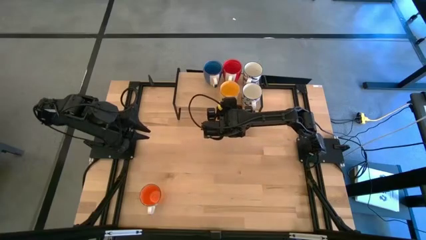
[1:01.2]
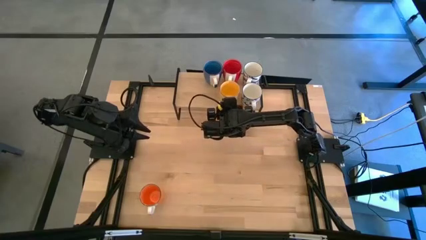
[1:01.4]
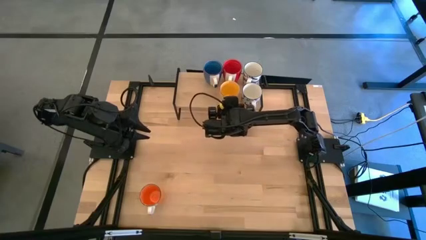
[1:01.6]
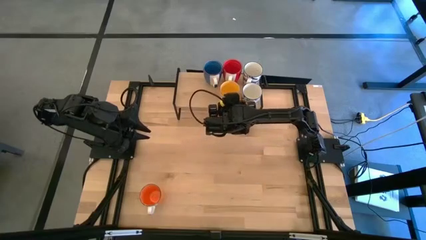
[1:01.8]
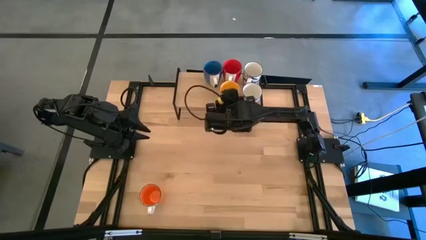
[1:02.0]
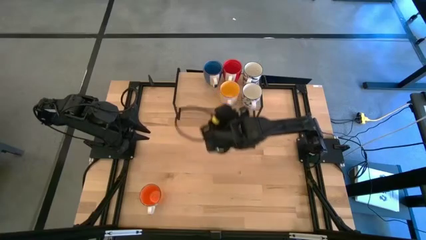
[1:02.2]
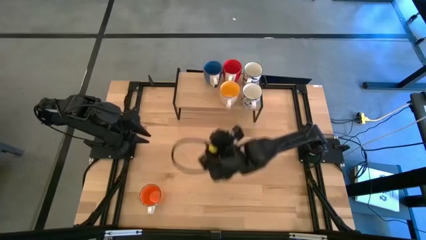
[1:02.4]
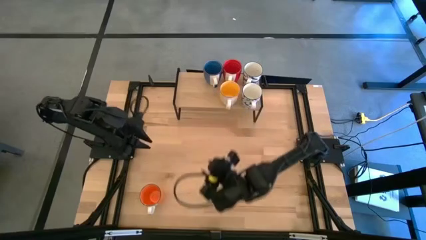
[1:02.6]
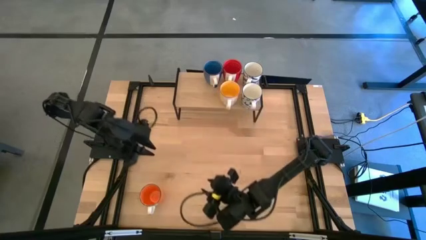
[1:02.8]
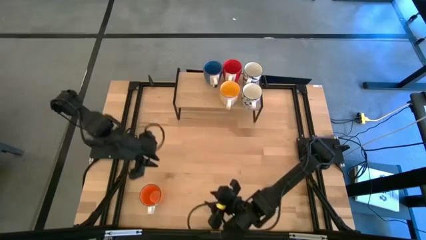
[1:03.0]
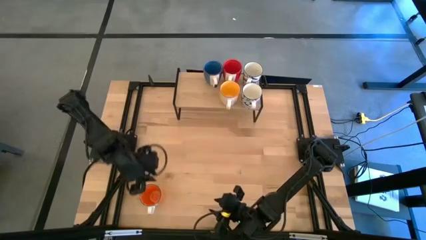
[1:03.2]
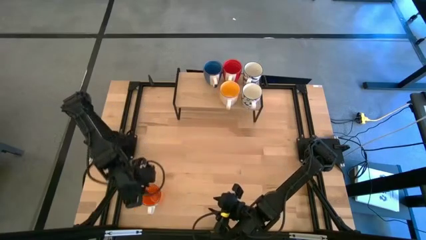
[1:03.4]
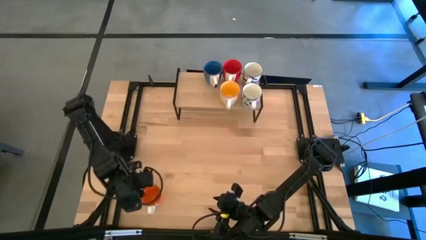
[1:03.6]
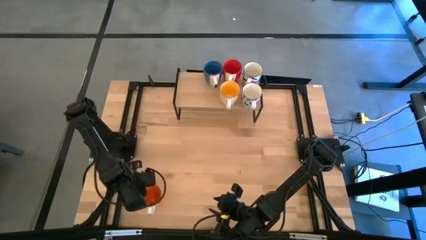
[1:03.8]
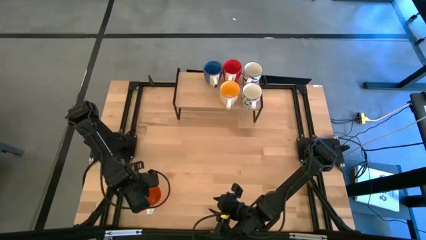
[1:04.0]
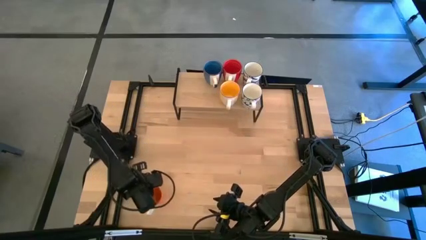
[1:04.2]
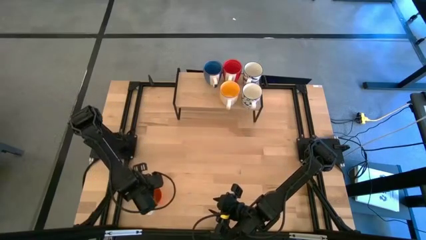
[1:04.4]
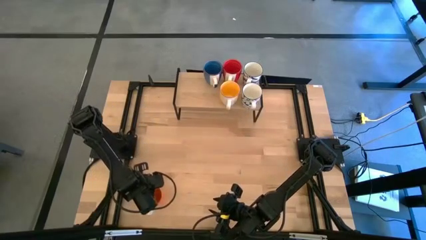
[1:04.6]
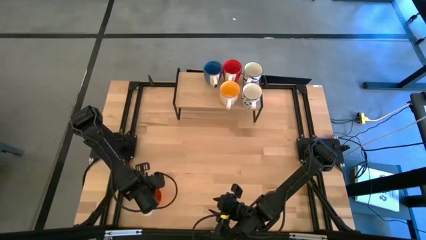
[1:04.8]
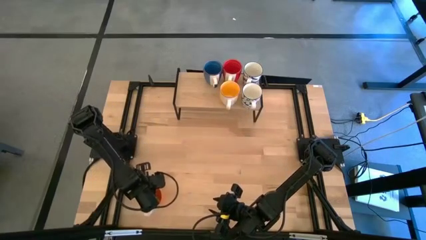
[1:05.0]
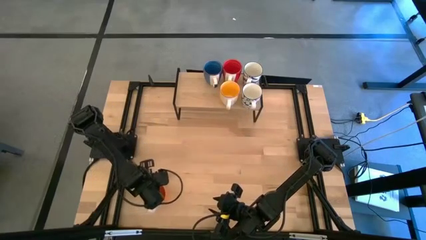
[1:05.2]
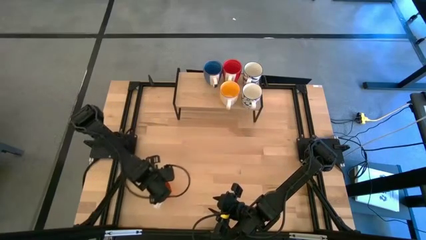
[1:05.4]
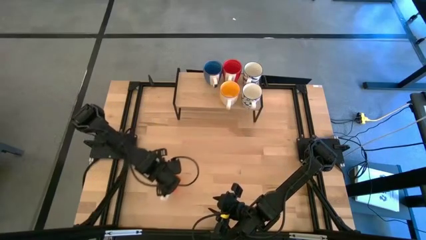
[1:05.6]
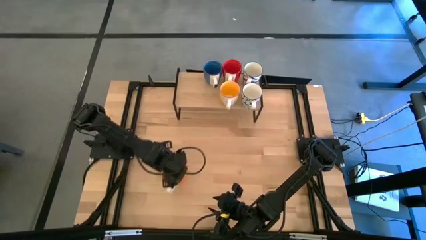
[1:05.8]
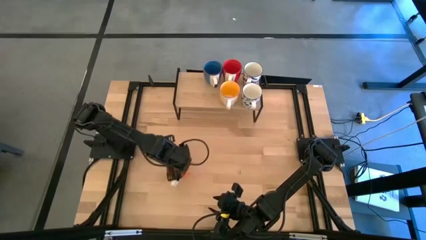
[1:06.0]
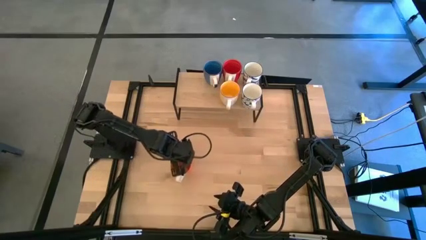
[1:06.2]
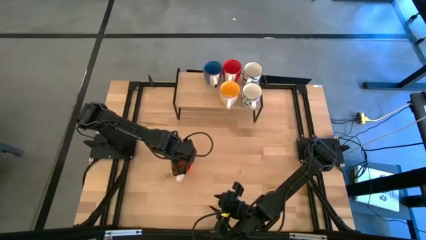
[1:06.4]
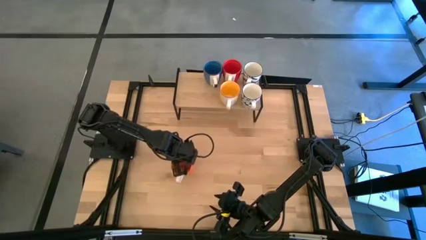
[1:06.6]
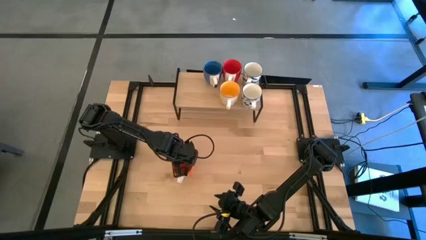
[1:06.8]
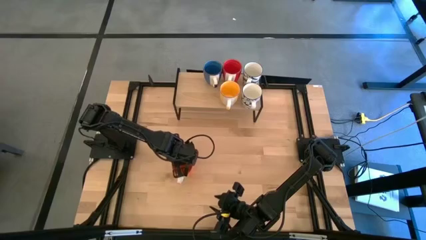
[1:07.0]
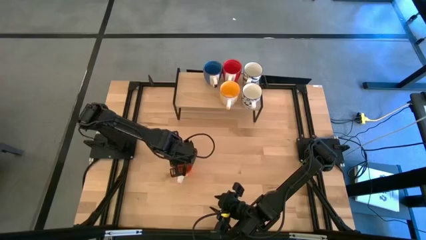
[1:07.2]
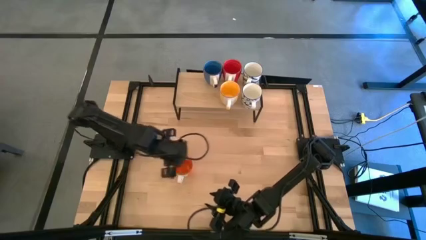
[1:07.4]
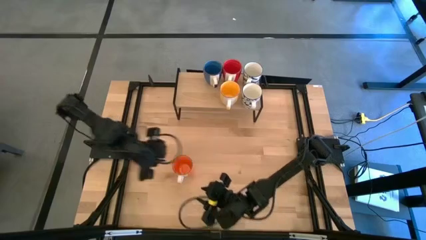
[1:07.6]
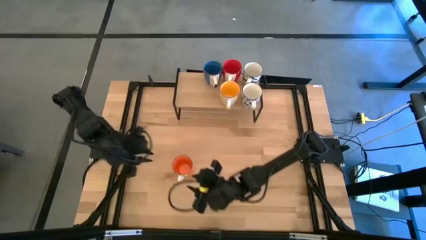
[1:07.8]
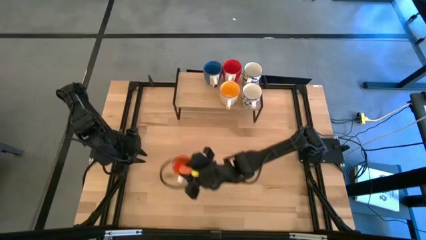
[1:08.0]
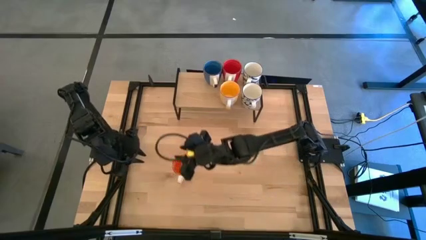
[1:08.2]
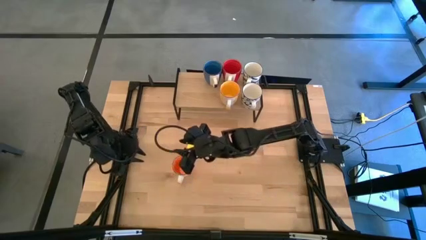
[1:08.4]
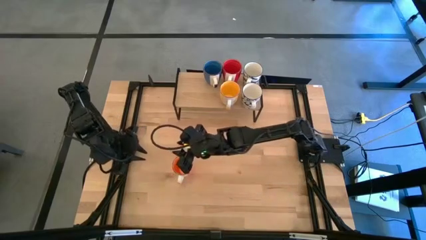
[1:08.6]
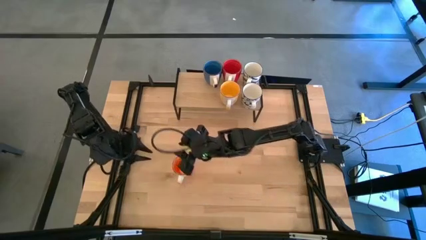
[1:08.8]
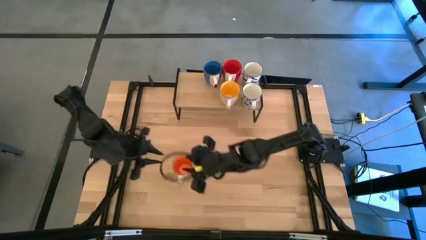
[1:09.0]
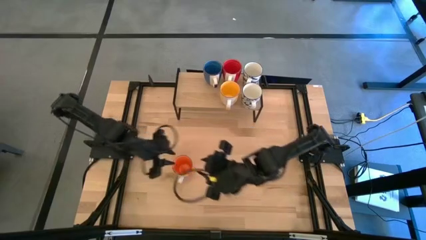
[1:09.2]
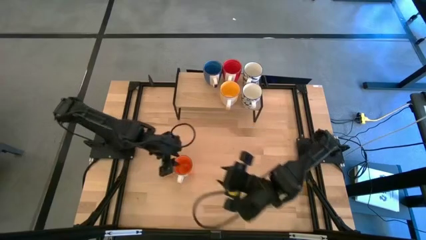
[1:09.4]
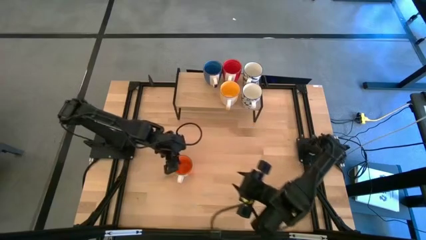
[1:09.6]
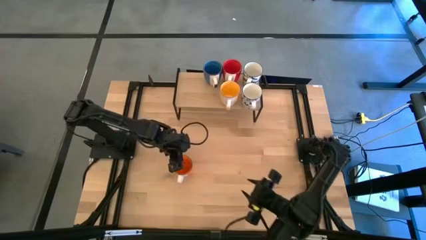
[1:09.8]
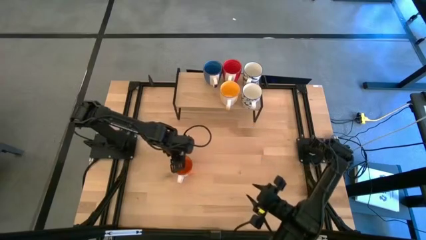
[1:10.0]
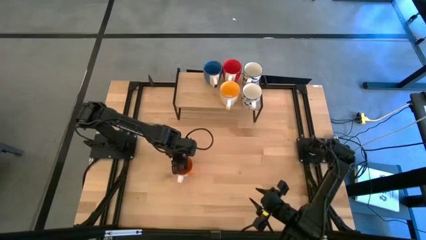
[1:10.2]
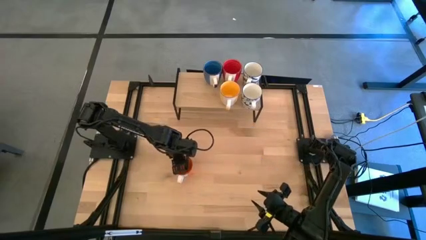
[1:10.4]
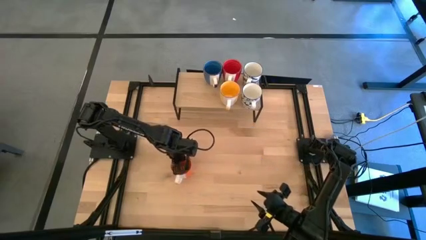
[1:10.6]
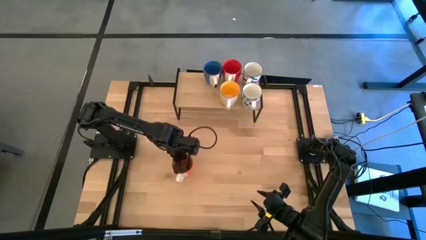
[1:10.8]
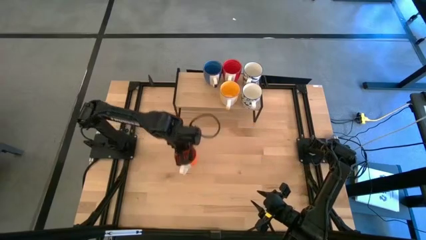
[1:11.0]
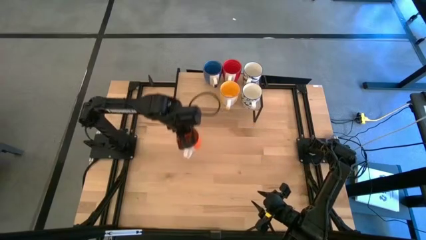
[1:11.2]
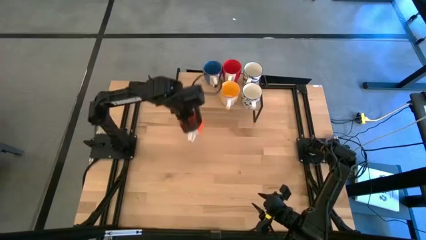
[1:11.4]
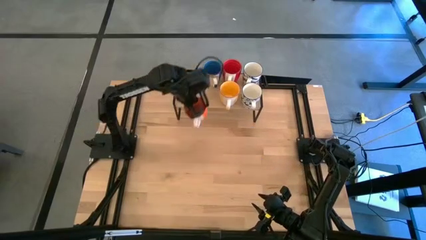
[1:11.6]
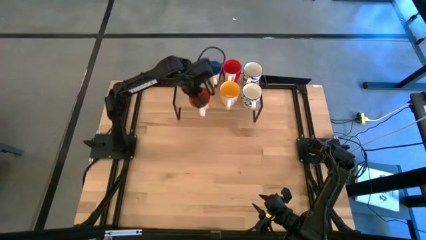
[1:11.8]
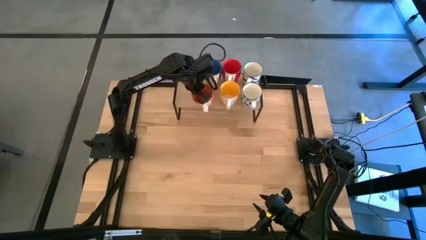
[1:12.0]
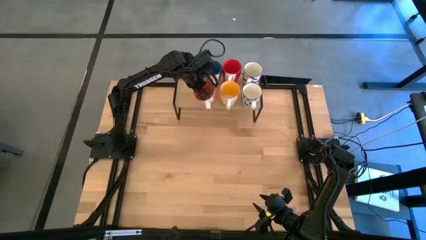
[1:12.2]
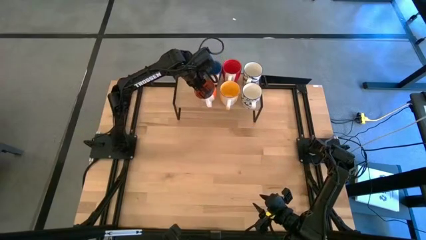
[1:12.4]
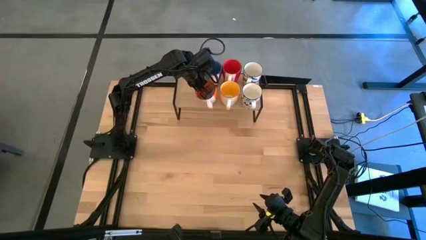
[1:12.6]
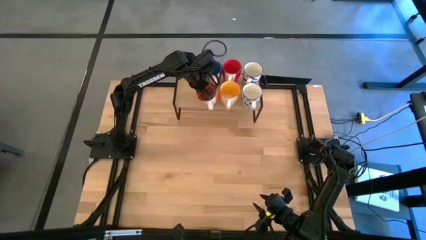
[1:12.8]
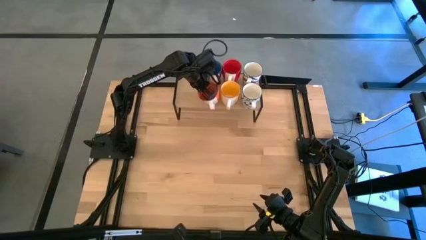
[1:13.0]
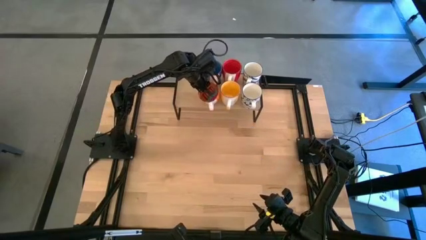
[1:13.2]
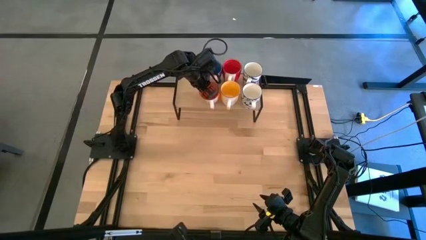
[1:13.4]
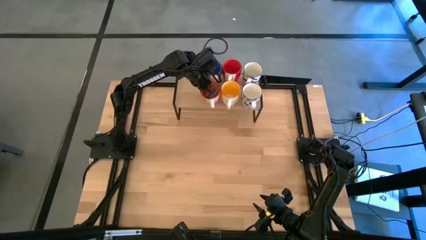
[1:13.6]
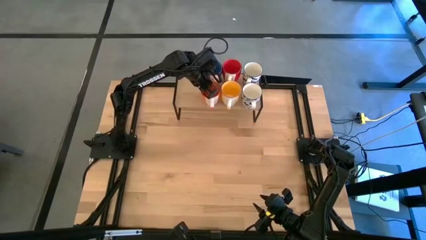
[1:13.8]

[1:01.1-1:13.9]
Task: Place coffee mugs
Put the orange mug on the shelf

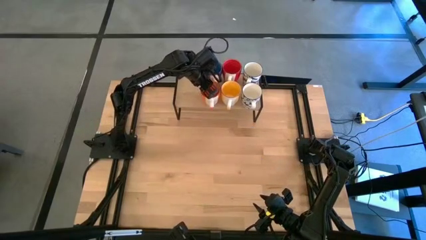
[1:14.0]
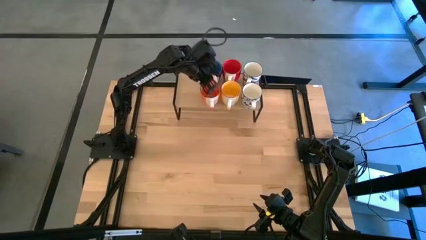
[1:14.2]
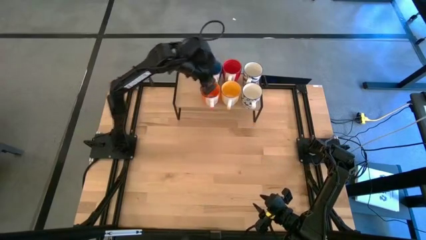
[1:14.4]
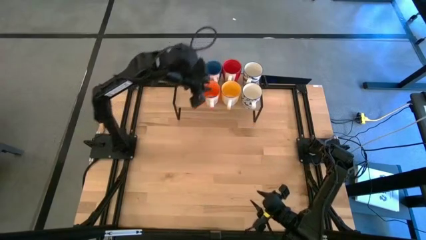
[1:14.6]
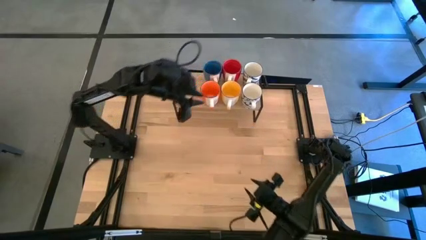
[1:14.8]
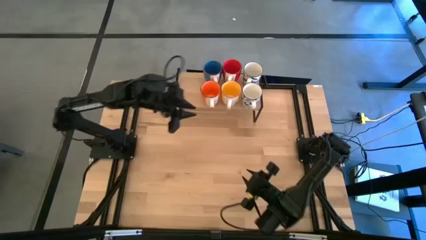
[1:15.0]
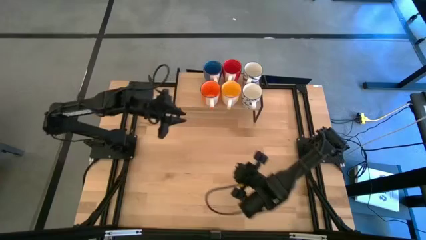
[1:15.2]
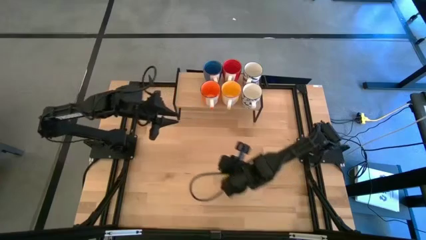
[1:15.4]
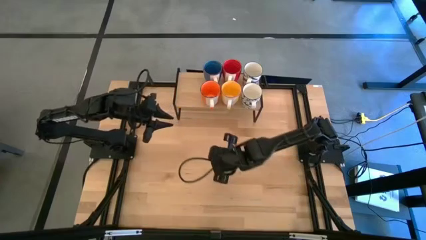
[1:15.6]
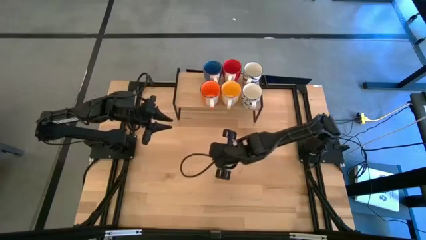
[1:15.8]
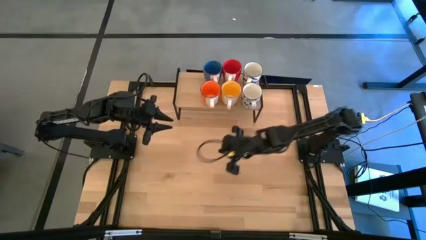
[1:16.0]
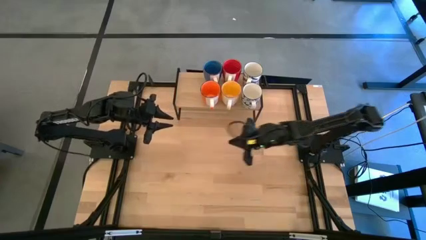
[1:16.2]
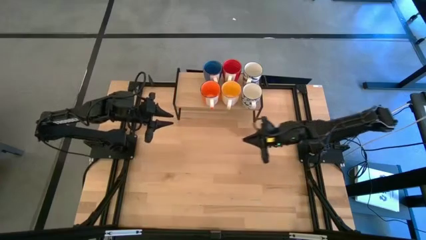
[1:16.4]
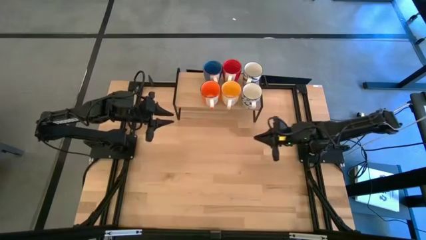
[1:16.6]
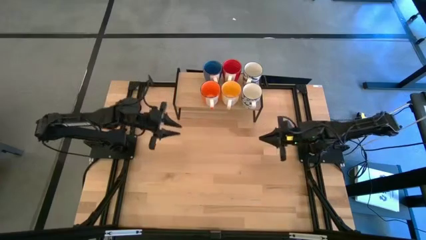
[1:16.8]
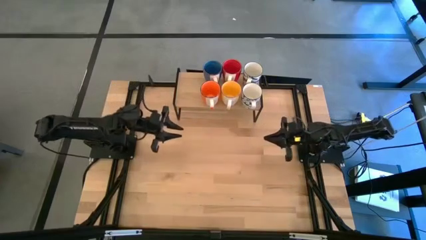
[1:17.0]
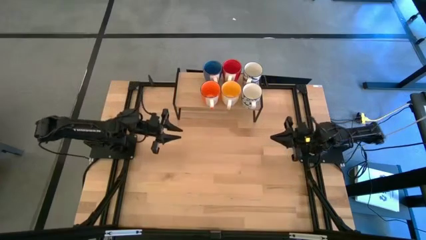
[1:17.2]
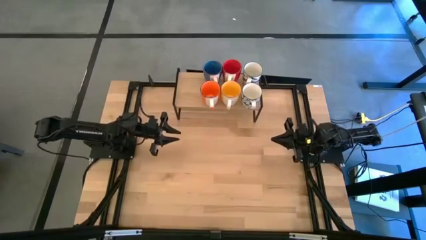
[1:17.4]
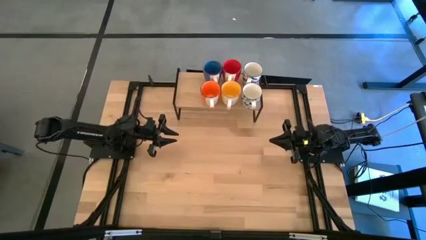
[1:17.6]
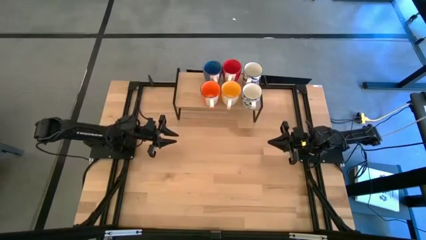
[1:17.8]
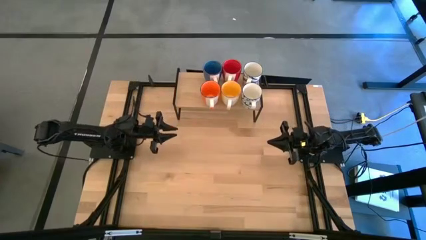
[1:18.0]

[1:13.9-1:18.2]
Return to Home Position
